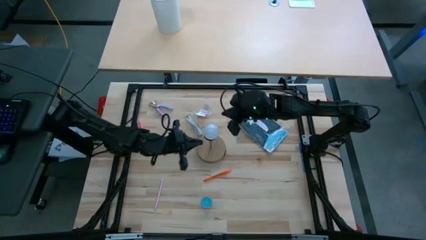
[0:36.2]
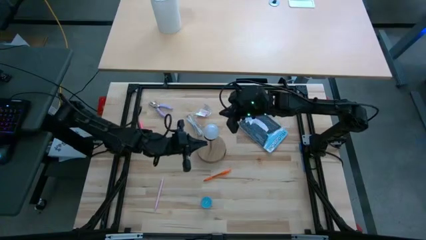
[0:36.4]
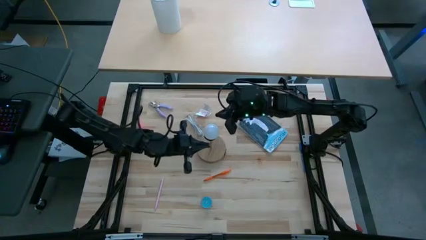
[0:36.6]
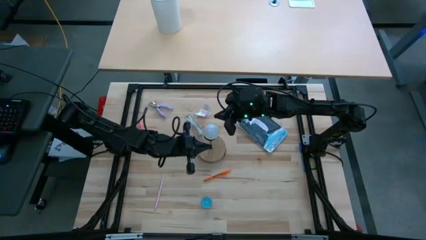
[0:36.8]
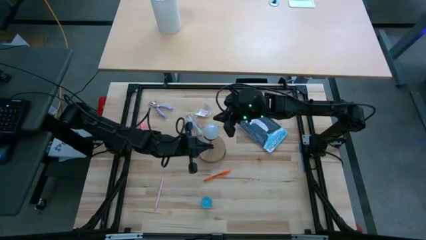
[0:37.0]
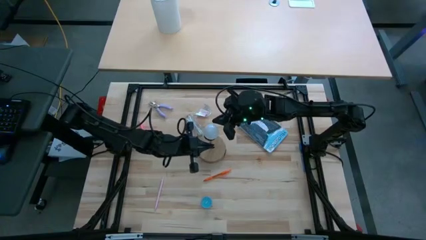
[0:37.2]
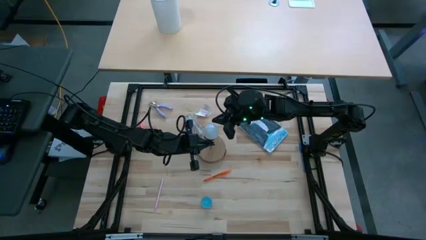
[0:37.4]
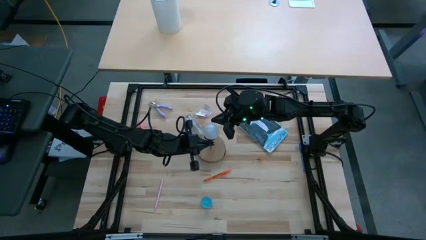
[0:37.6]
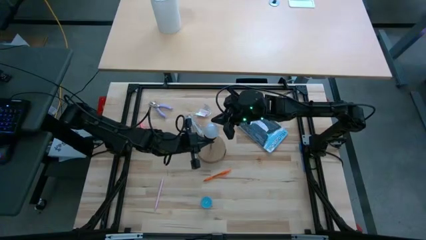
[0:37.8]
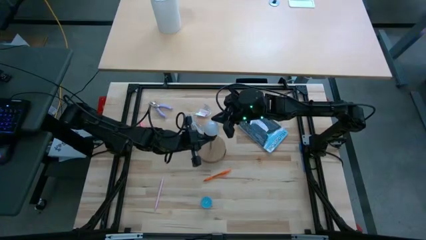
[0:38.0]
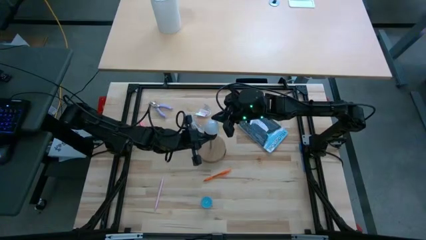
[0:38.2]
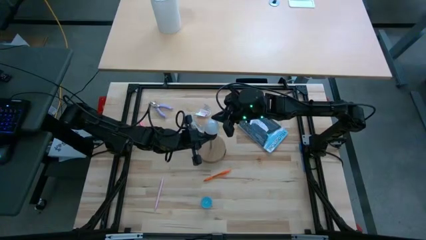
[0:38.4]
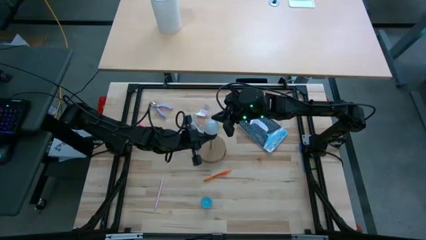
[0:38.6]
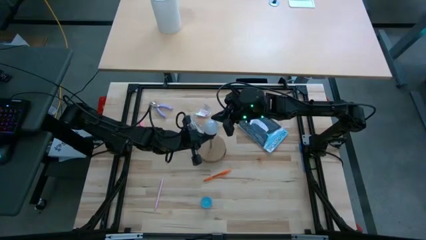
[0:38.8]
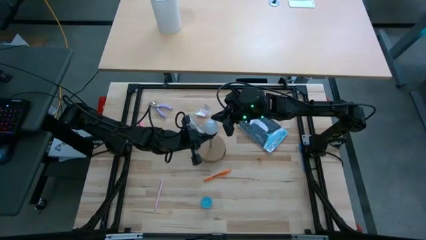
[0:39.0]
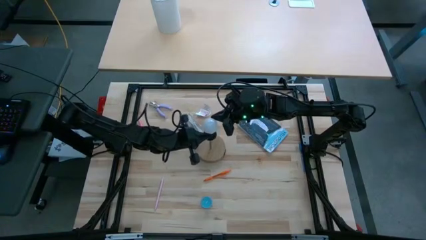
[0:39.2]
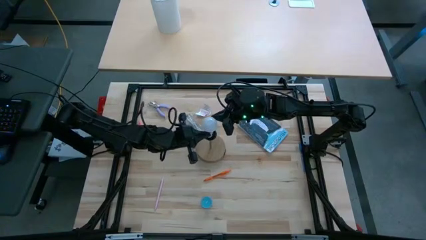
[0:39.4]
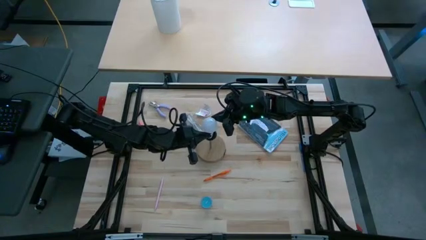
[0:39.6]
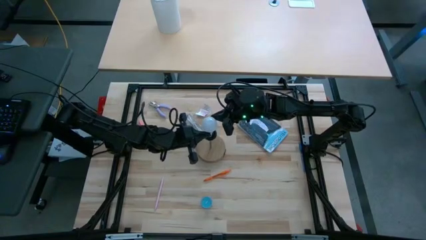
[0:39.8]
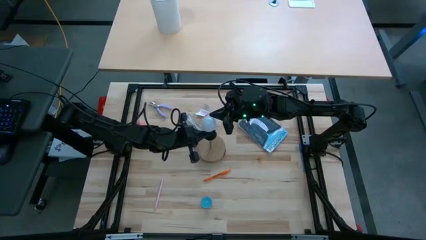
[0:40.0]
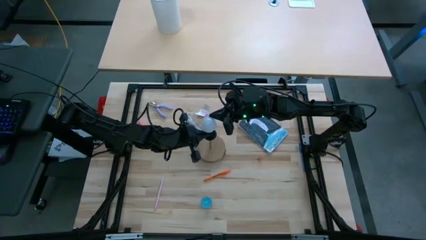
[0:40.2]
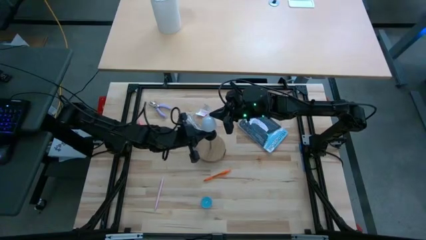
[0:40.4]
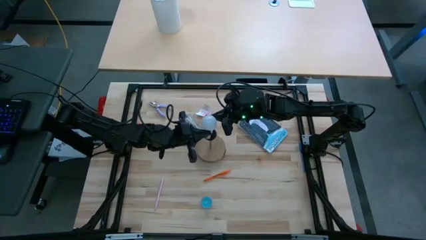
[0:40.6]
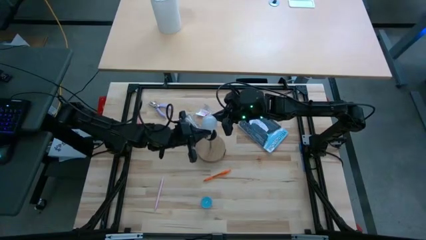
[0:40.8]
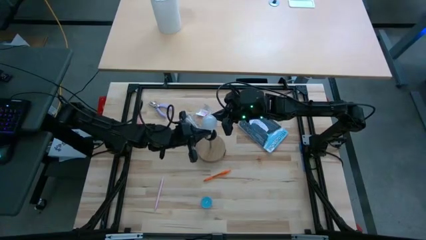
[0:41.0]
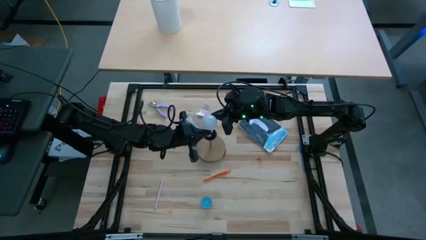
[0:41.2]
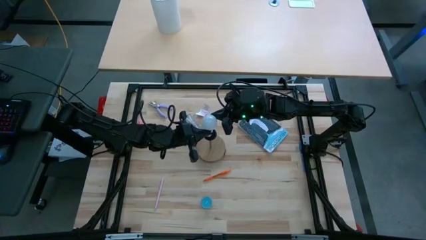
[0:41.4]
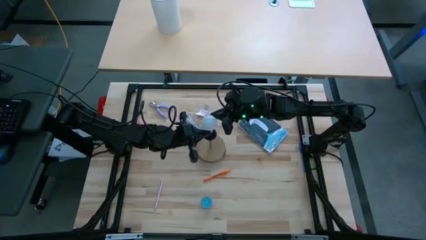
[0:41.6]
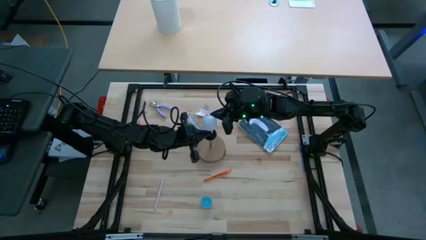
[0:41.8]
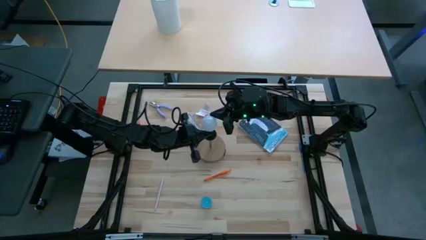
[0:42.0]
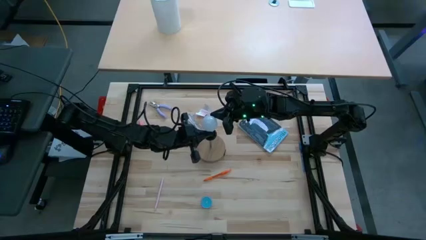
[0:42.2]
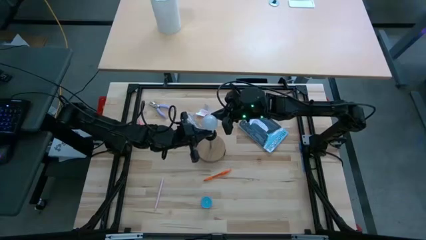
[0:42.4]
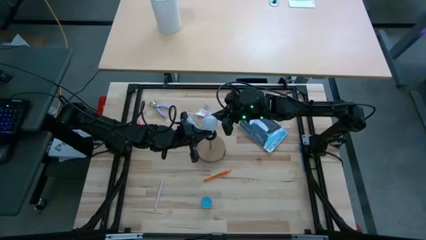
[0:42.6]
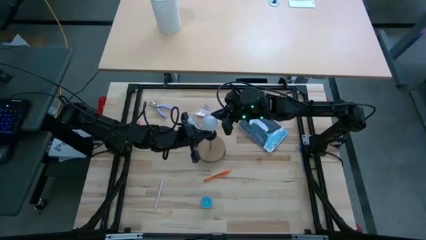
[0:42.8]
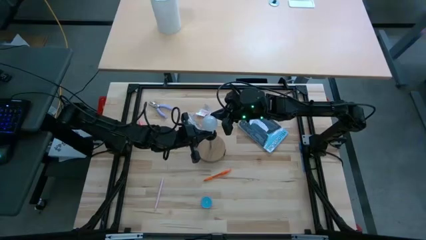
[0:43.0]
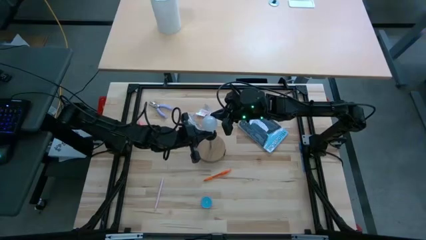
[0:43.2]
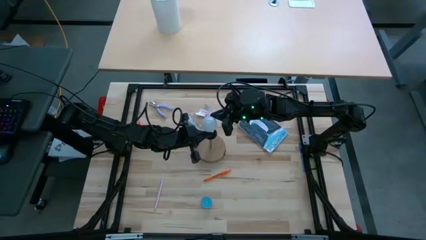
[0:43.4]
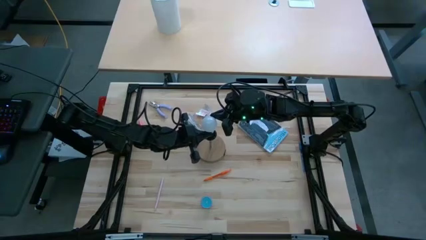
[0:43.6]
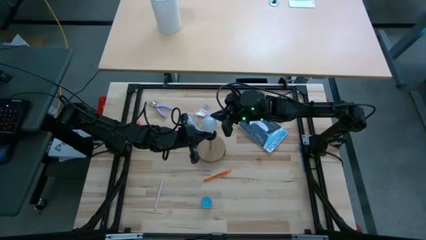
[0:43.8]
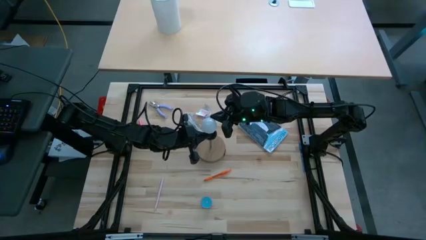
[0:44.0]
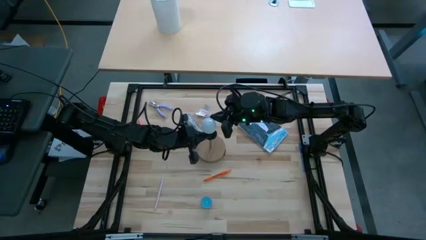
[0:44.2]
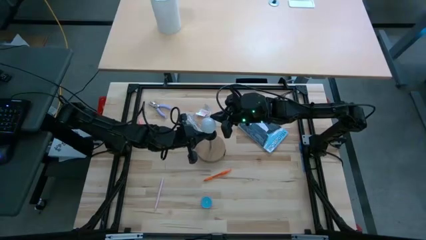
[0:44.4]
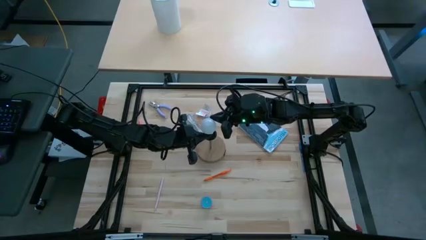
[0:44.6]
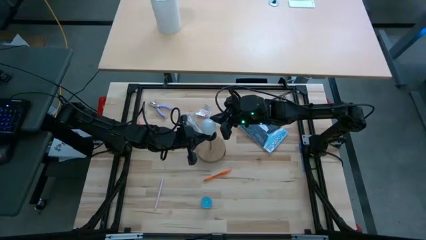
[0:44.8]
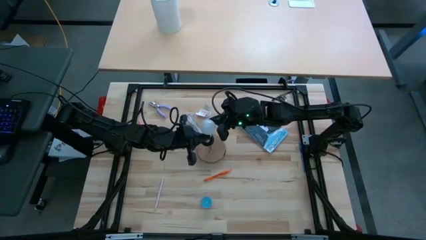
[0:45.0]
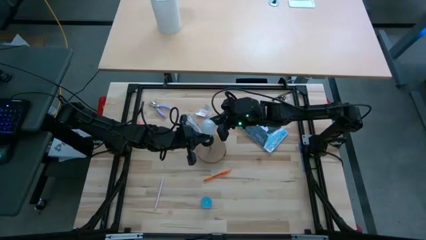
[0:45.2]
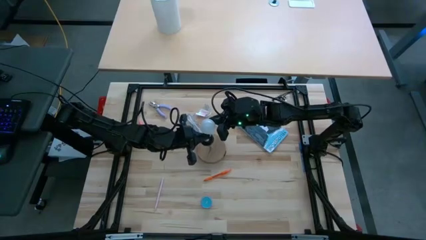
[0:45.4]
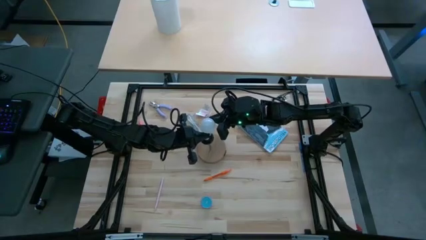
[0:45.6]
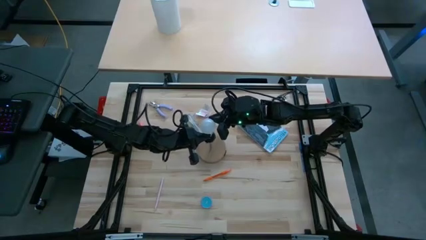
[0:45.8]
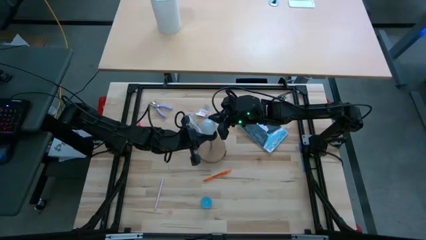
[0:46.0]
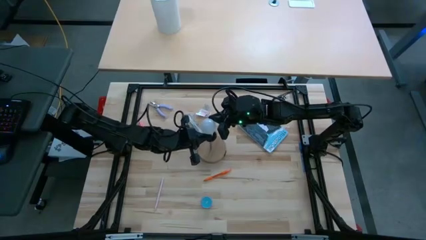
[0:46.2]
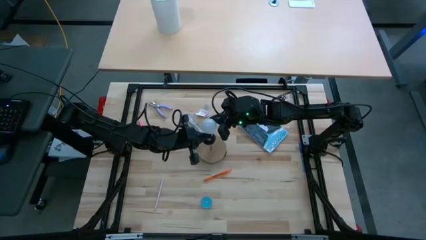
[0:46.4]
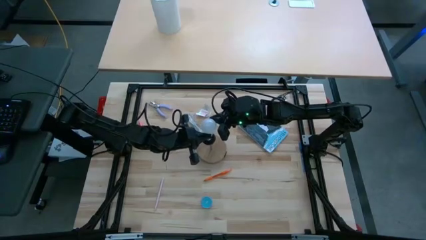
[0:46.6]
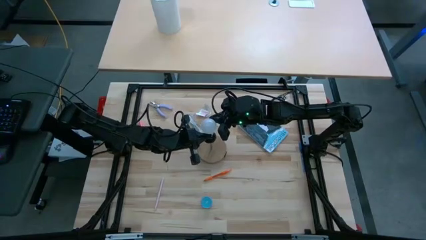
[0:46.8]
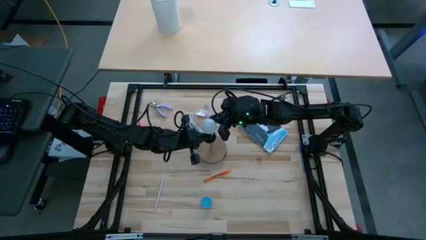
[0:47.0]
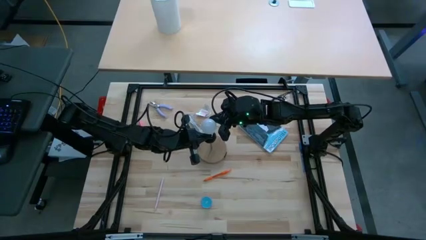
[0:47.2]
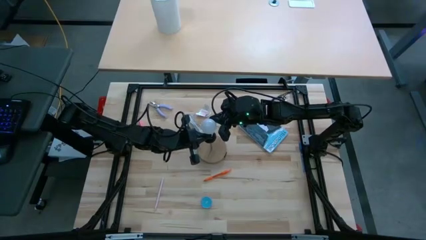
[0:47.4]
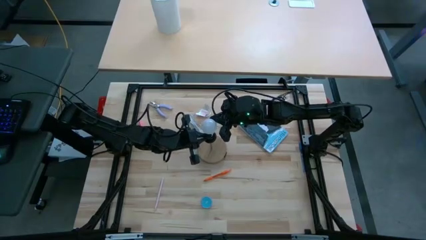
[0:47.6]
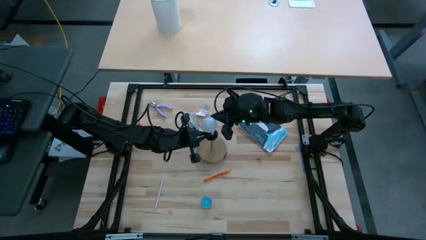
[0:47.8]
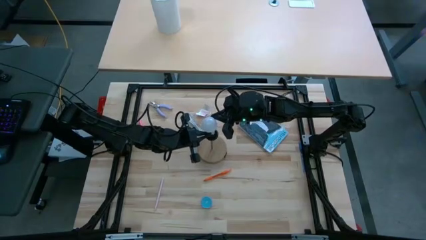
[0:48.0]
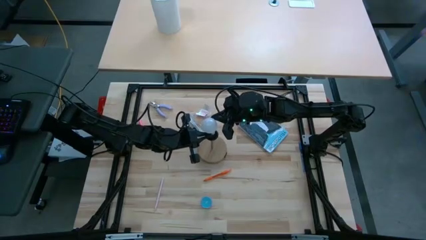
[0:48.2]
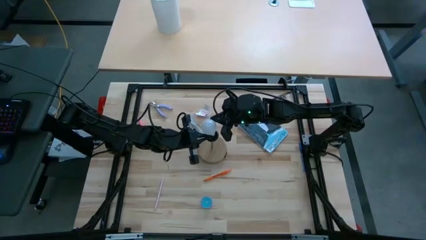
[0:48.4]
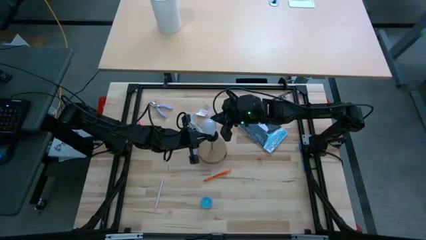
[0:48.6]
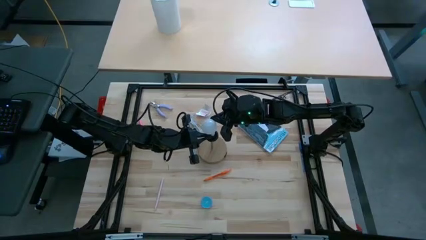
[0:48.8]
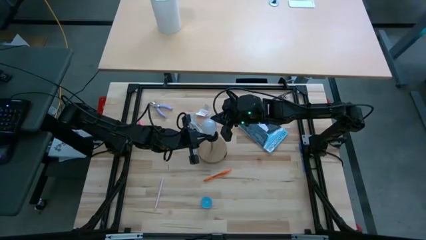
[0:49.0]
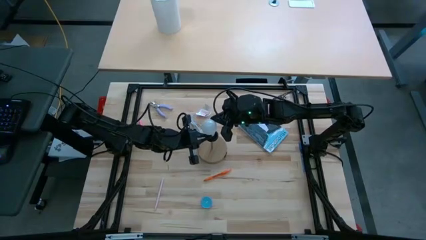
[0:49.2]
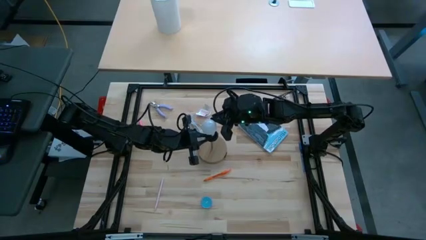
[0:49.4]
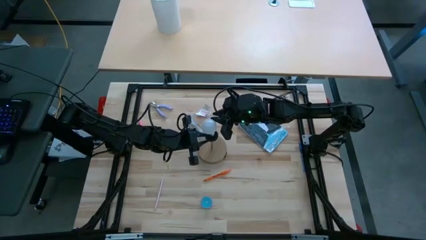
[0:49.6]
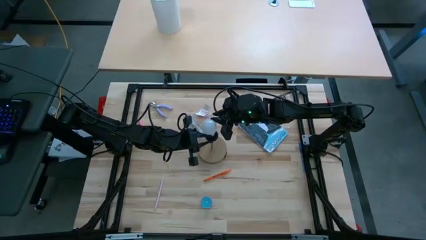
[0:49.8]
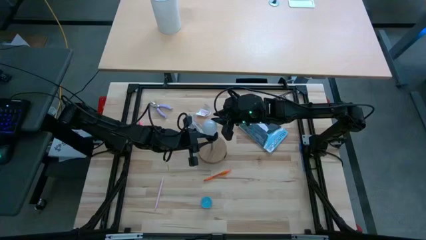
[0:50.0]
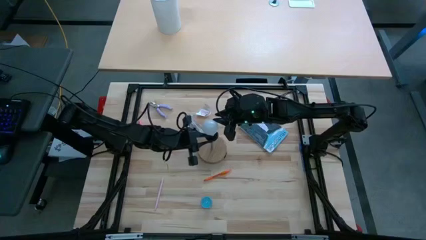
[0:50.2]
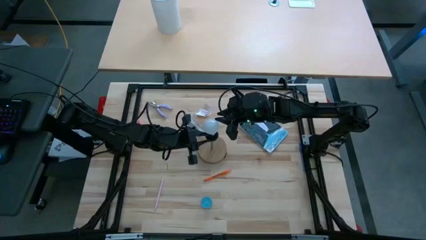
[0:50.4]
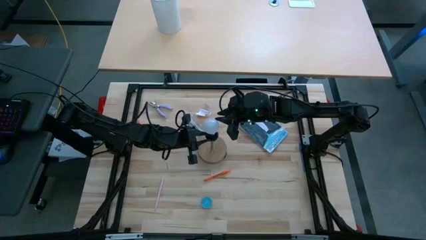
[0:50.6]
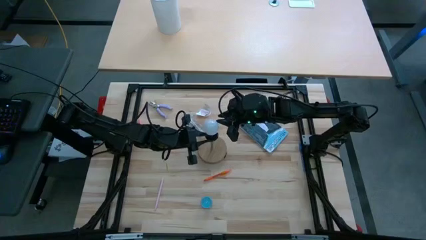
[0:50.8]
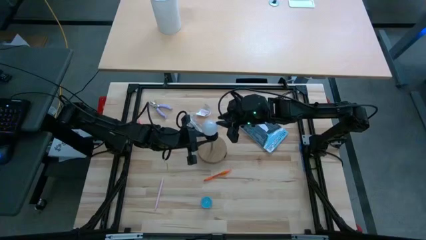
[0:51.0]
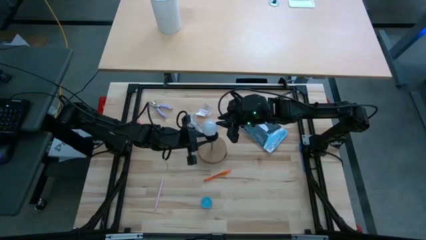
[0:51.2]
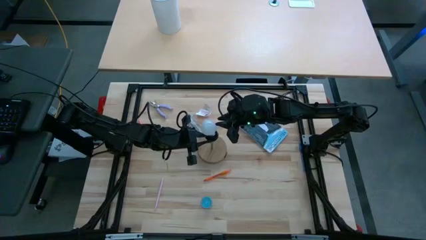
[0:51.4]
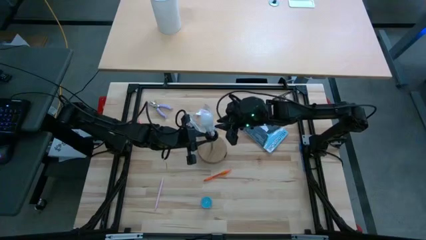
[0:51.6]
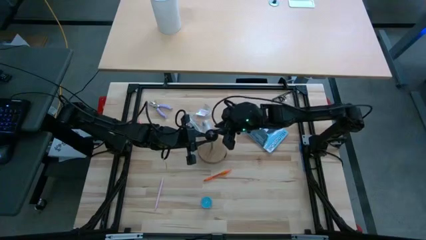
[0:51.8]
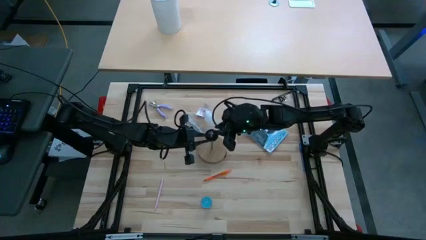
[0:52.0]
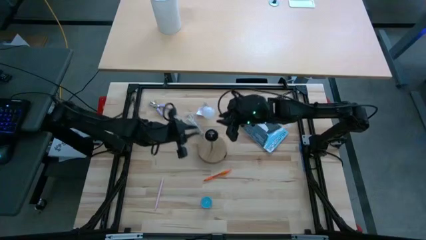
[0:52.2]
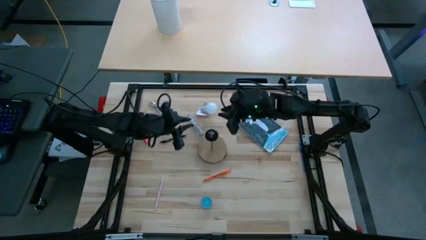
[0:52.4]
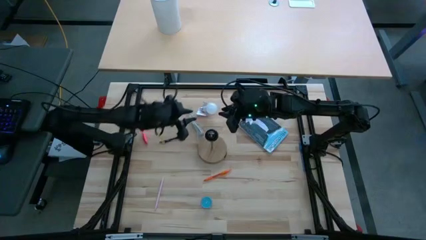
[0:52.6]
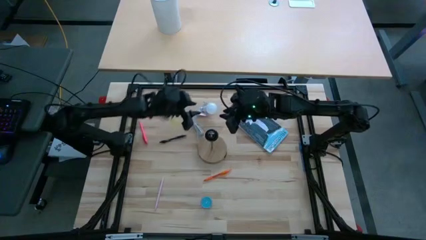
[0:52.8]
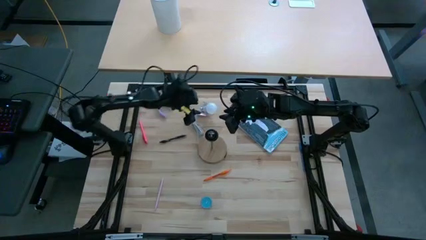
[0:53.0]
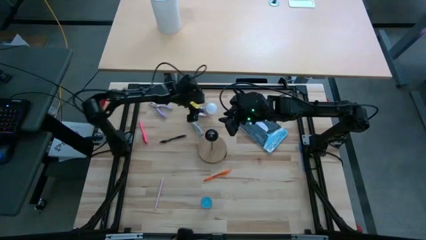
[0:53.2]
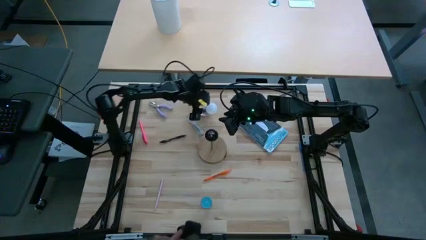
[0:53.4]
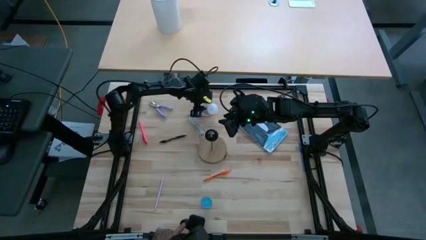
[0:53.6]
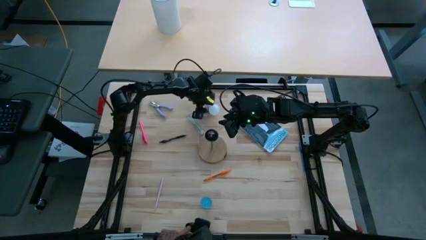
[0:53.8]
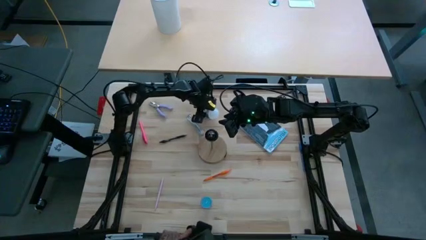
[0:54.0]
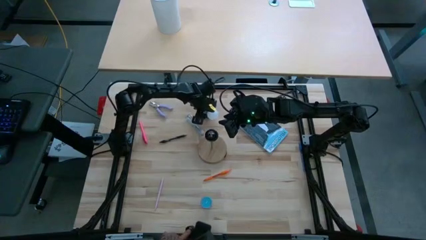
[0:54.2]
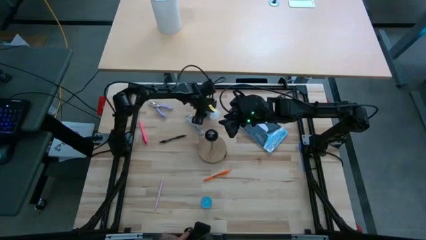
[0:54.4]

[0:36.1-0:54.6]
Task: Screw lightbulb
Insert the light bulb into the lamp
